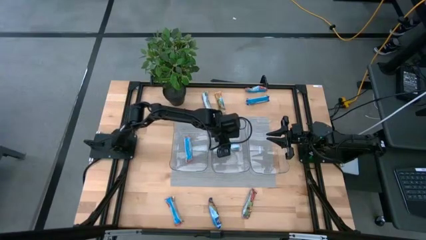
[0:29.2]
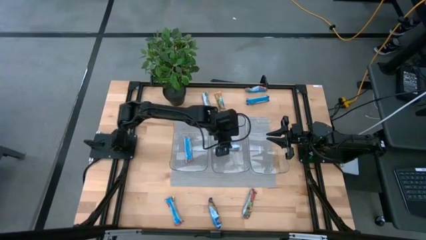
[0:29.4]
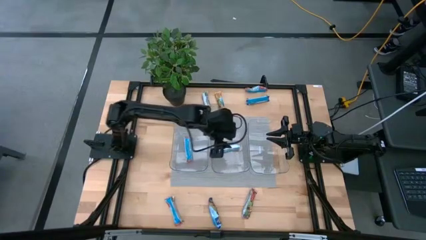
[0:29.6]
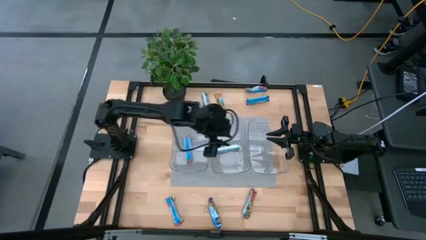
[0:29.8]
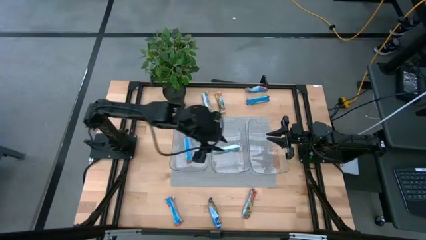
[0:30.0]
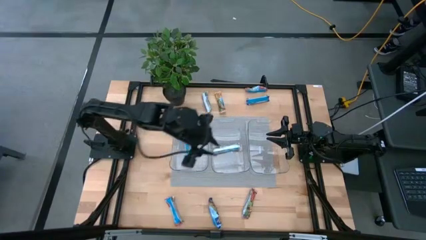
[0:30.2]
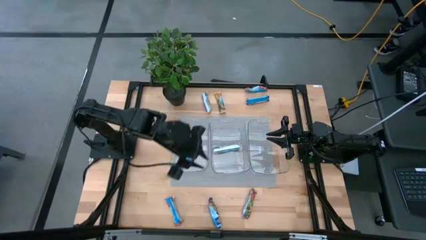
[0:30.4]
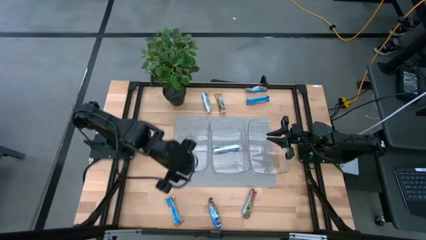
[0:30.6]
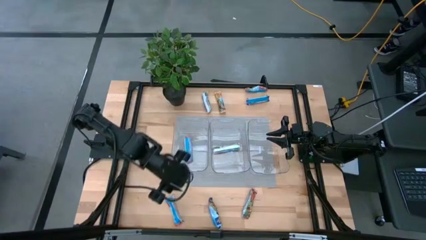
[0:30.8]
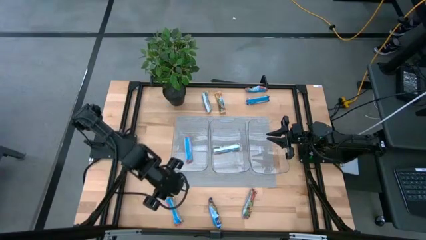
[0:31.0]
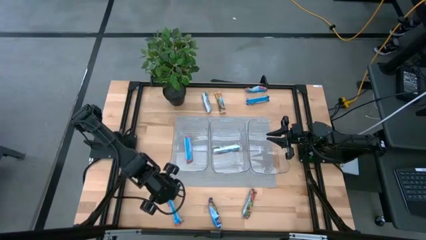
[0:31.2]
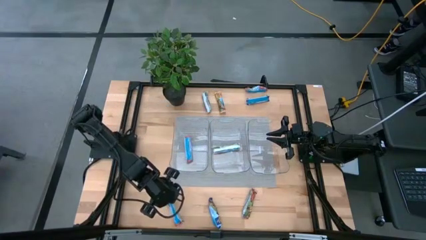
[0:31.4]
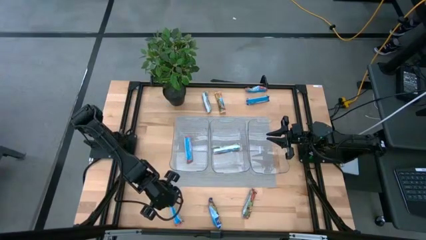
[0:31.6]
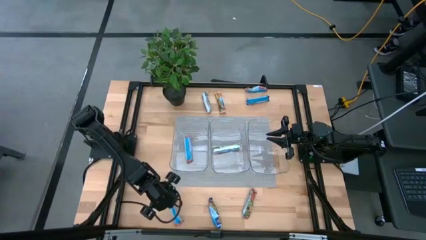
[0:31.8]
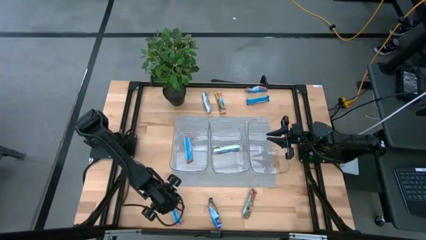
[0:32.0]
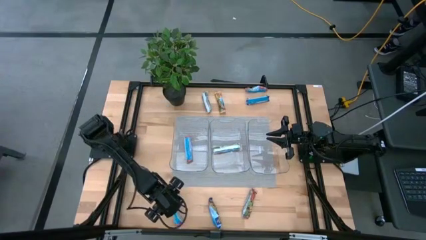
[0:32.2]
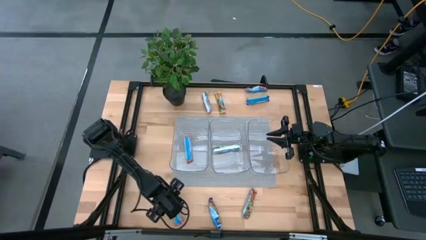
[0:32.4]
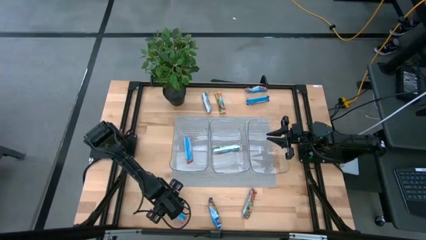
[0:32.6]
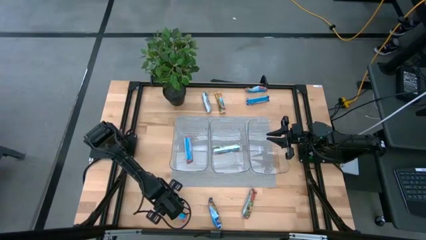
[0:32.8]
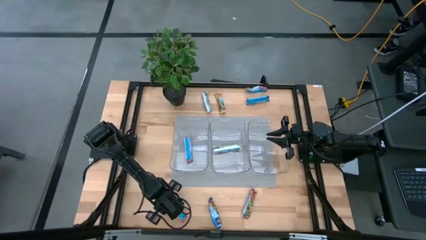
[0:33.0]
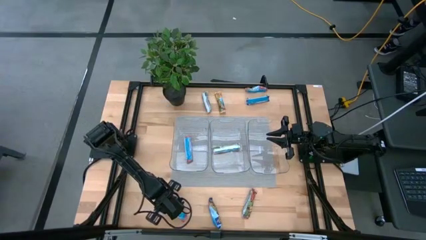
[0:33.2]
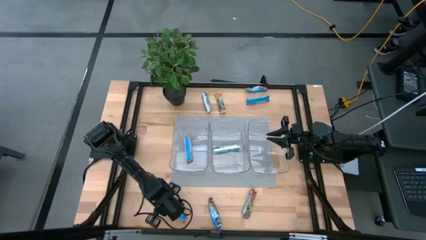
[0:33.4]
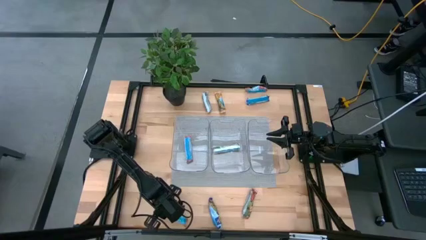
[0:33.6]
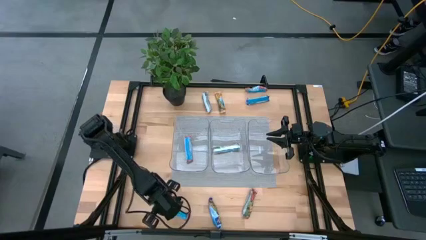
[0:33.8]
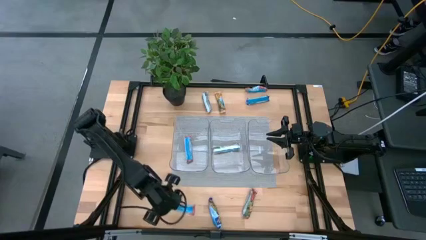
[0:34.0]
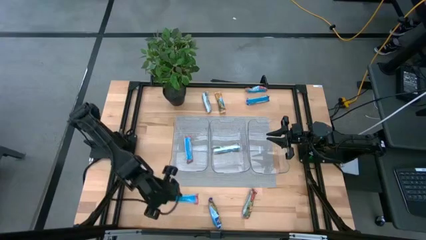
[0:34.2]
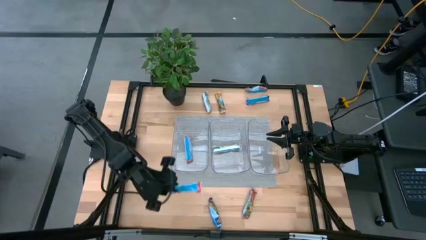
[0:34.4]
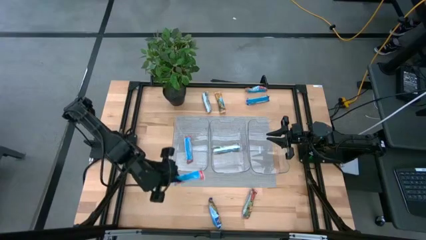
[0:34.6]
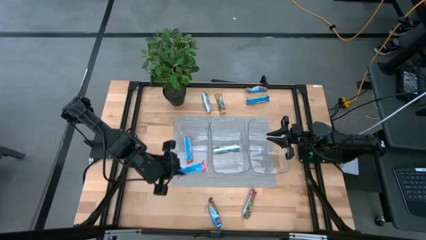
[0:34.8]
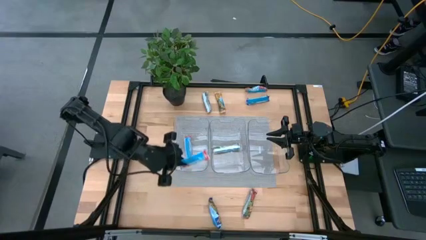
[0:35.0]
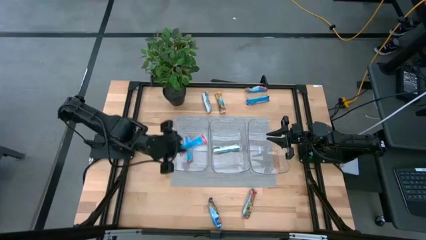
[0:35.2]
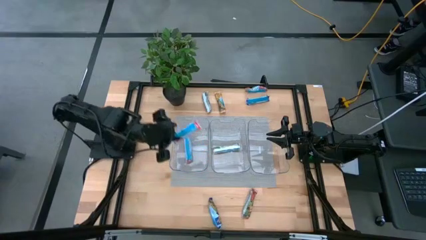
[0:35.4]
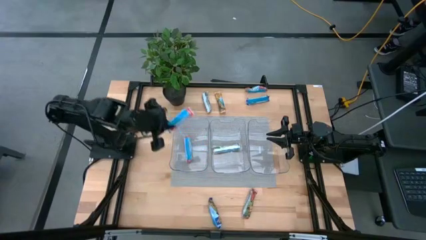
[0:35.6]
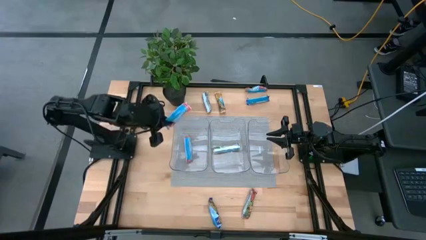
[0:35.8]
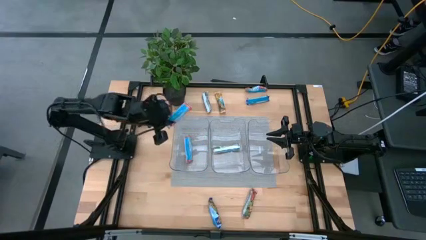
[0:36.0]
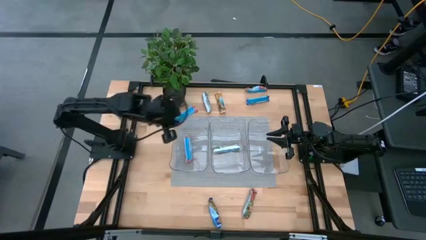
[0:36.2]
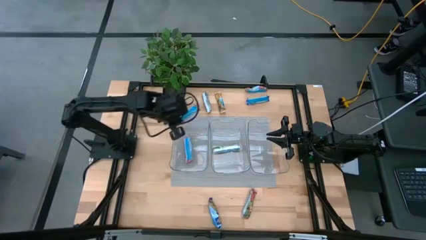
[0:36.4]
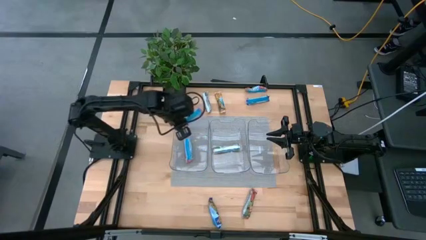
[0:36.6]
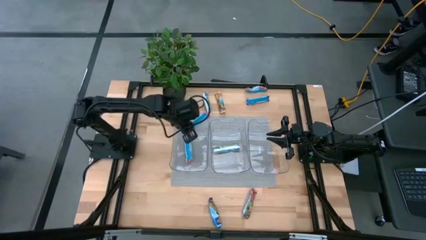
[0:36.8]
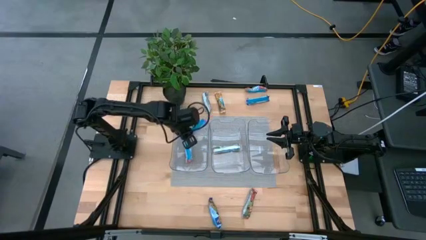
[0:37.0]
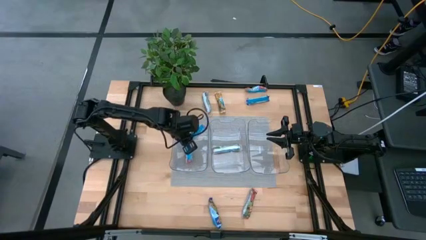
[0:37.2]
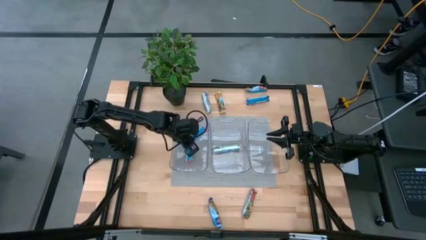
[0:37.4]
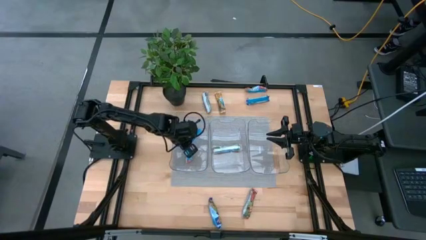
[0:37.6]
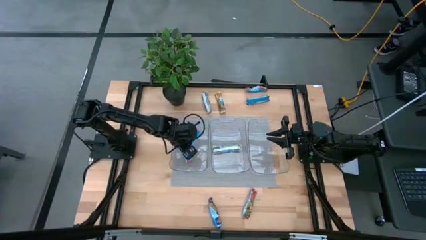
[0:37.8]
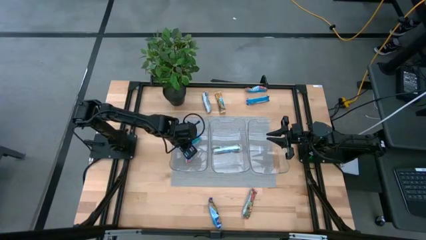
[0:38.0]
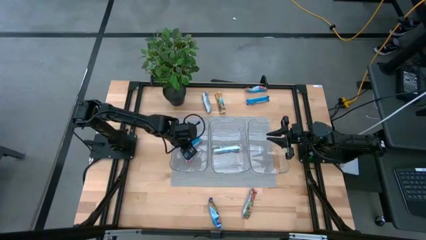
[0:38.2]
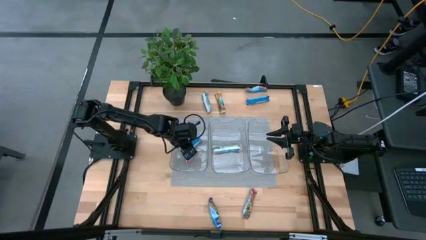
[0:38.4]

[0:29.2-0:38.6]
Task: Pick and place Granola Bars by type
Put the red granola bar into the left transparent bin

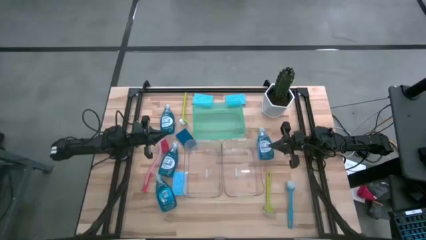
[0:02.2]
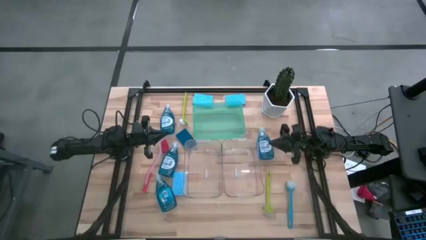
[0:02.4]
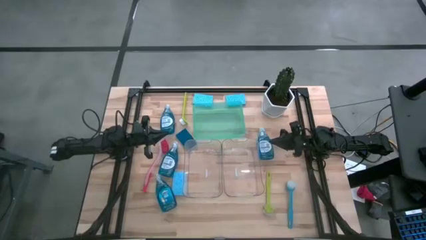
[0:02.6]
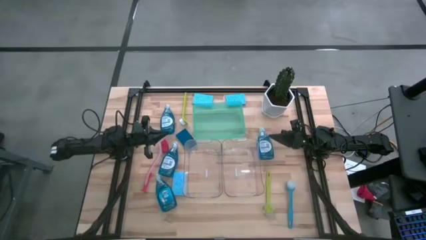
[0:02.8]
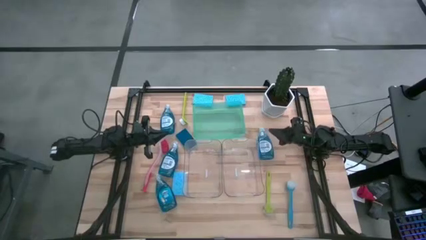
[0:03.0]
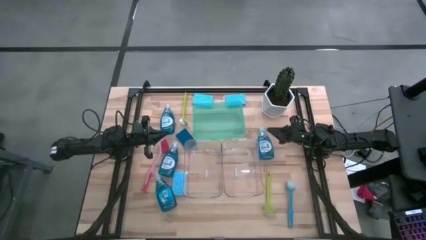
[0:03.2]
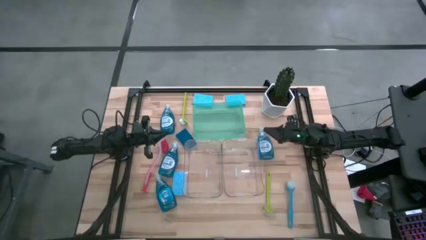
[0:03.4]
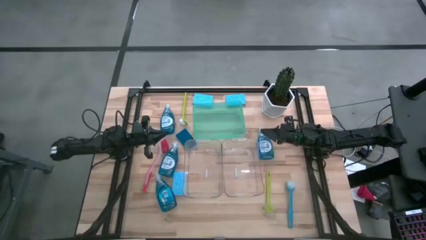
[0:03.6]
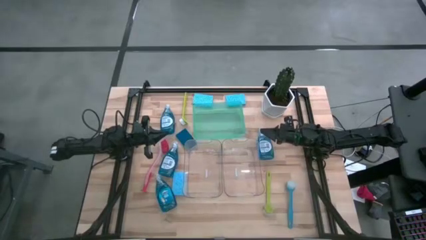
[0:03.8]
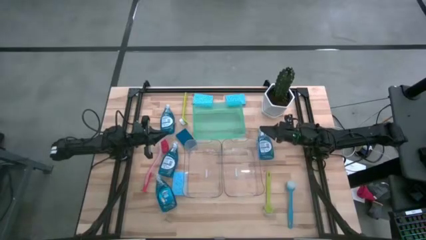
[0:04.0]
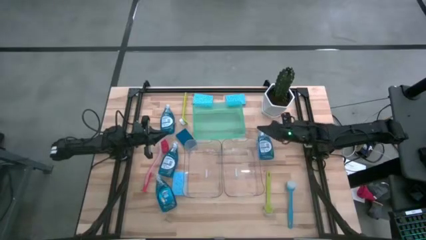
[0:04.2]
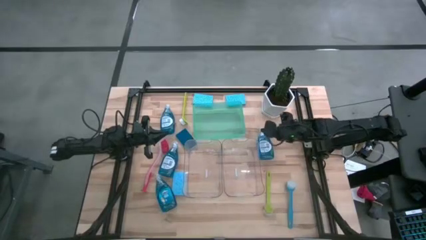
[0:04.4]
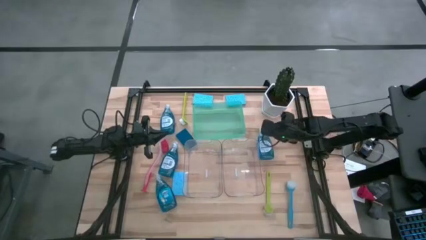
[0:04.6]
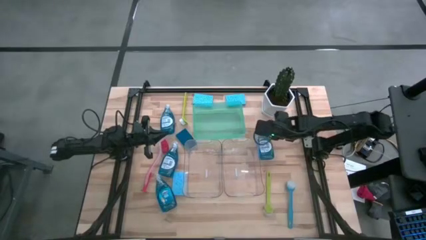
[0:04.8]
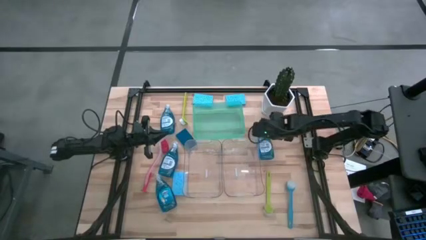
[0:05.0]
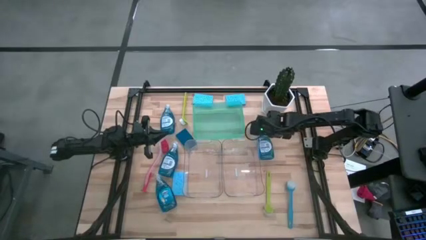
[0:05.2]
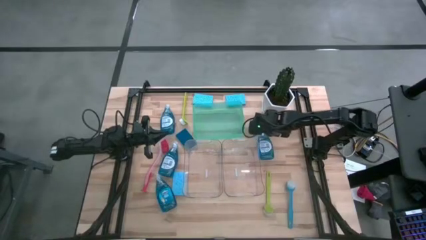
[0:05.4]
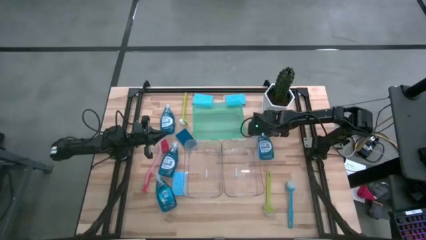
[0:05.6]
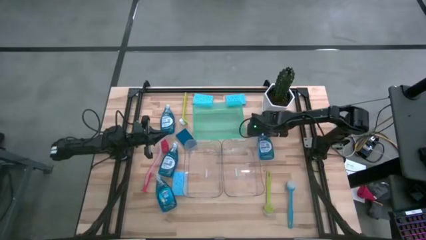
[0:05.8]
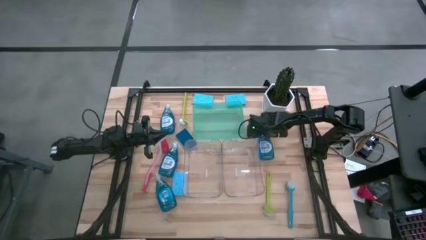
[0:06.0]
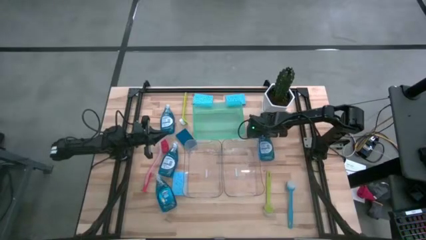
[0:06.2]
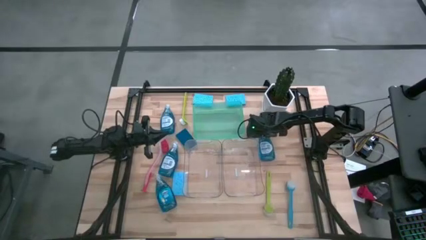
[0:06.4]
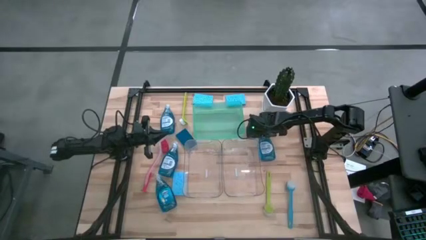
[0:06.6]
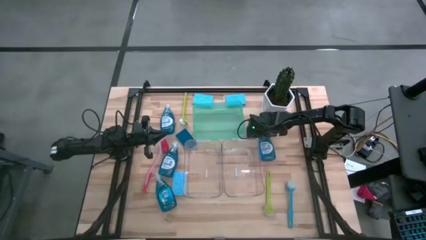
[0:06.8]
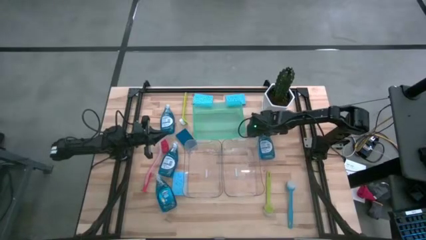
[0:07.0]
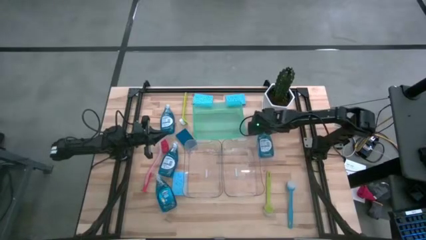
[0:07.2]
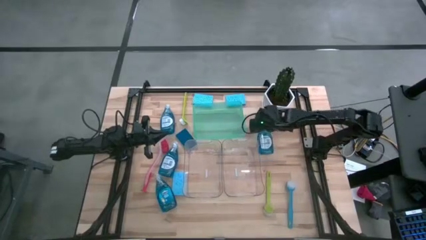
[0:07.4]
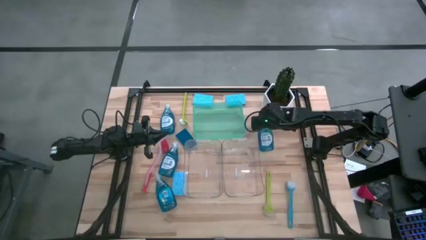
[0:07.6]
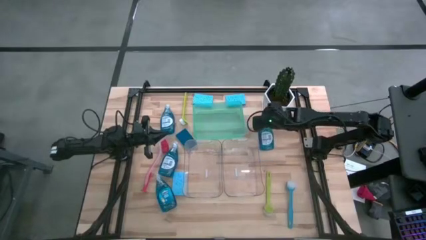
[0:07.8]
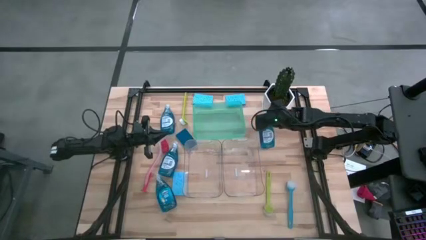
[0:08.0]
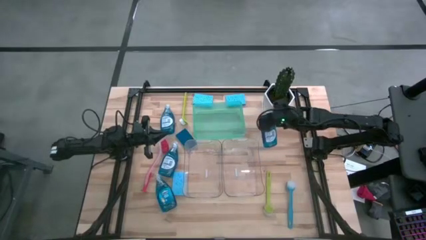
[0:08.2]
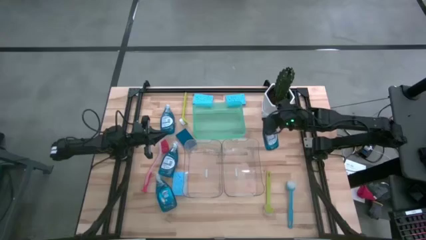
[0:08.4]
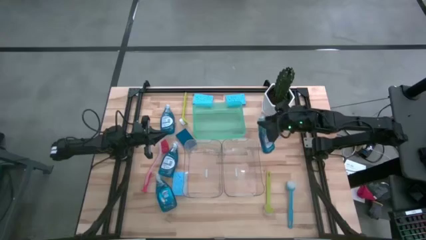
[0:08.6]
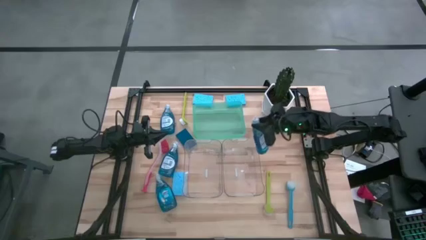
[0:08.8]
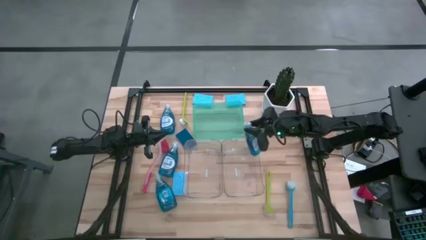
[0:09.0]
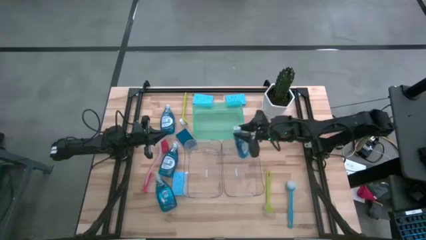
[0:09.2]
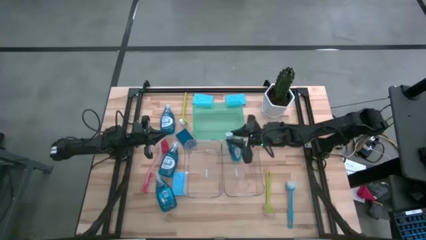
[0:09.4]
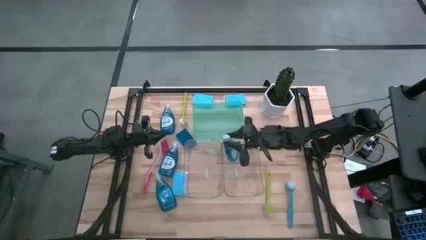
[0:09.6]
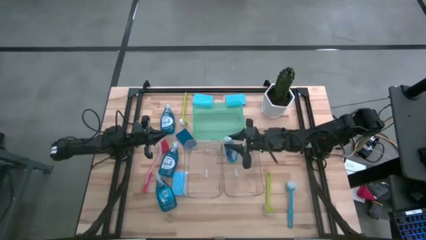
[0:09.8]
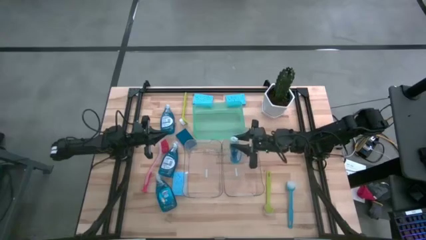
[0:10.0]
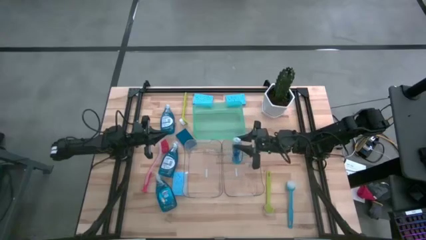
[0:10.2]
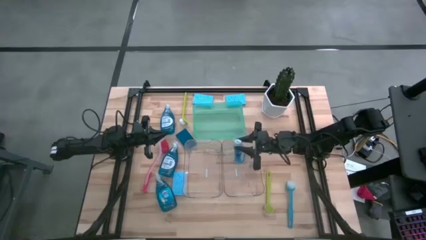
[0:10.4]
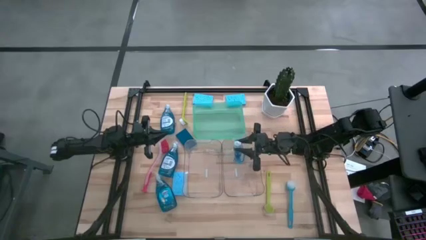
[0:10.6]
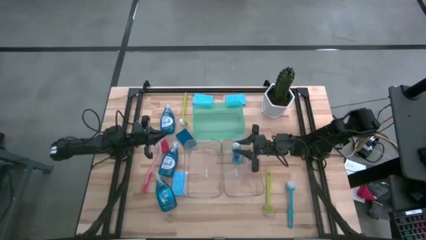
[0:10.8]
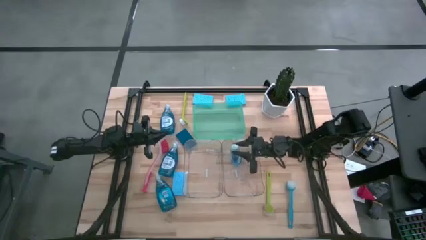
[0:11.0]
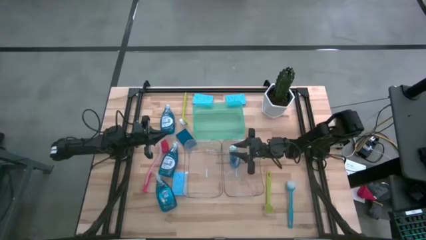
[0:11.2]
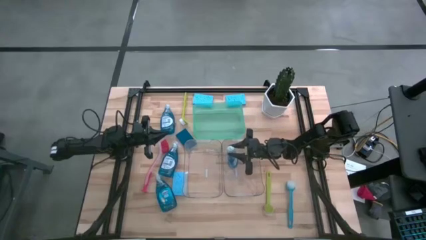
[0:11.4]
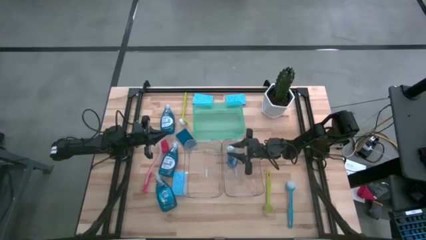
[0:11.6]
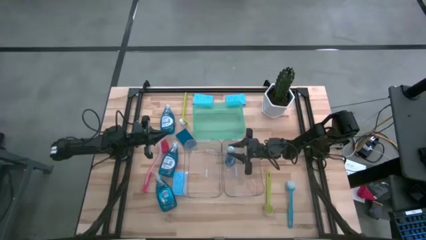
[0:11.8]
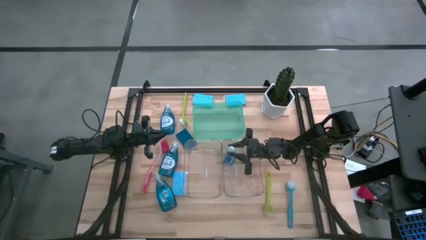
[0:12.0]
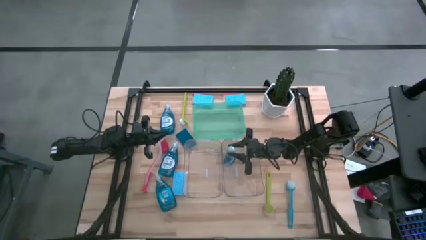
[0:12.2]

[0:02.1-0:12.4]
Task: Pick & Place Kitchen Sink Supplies
Put the blue dishwashing liquid bottle into the right transparent bin
